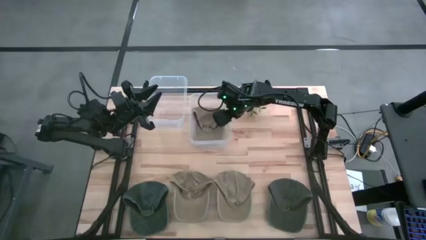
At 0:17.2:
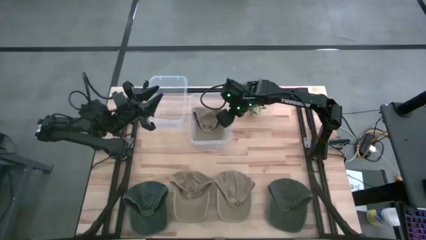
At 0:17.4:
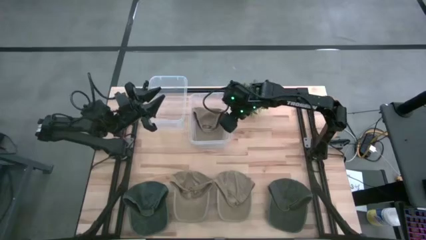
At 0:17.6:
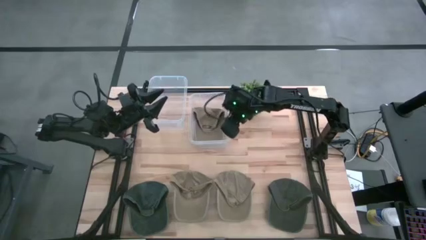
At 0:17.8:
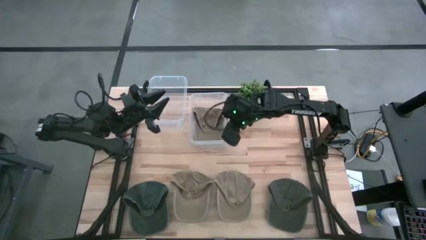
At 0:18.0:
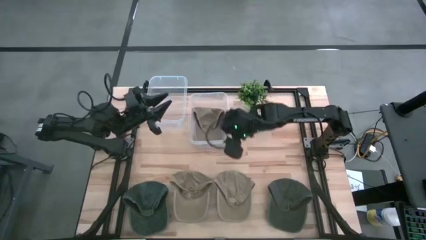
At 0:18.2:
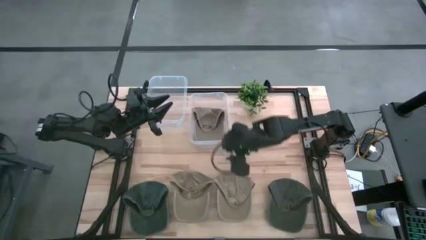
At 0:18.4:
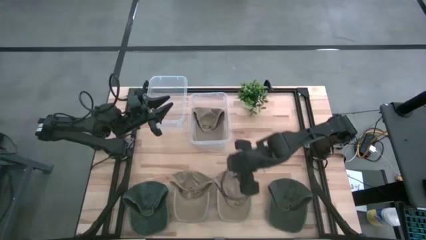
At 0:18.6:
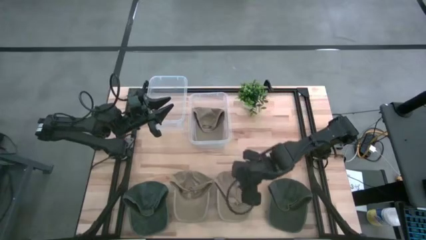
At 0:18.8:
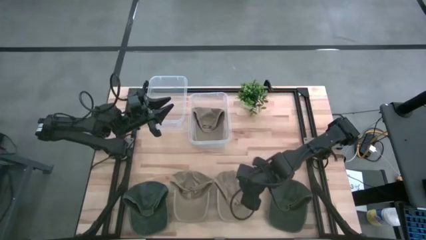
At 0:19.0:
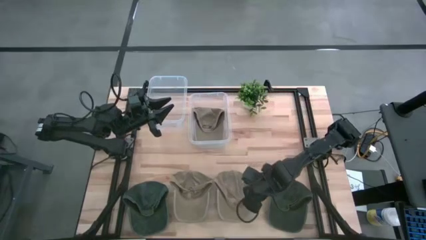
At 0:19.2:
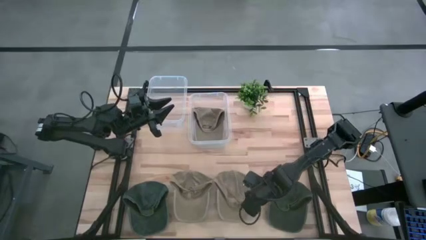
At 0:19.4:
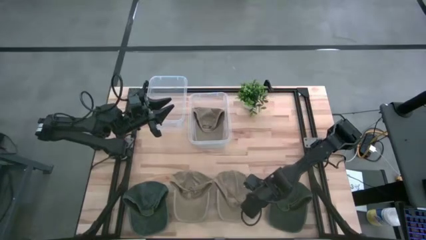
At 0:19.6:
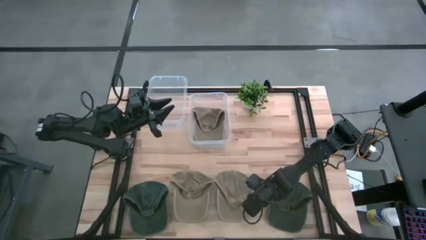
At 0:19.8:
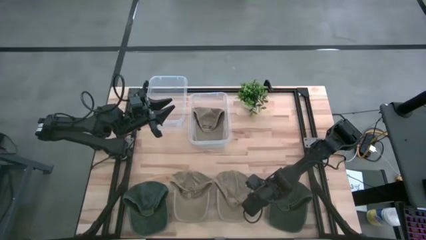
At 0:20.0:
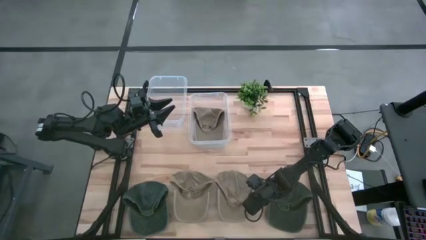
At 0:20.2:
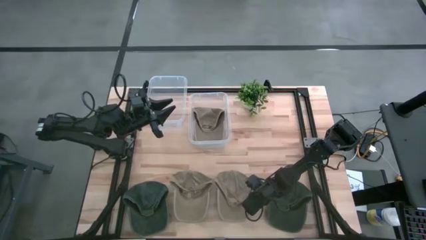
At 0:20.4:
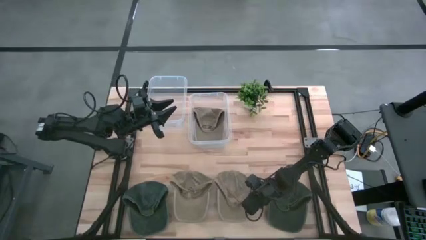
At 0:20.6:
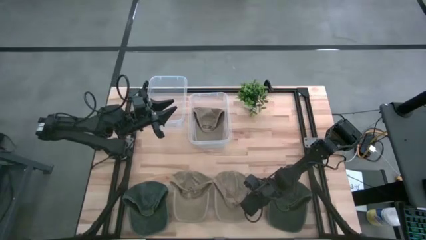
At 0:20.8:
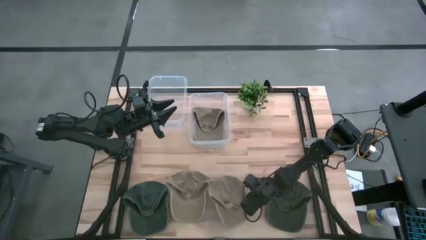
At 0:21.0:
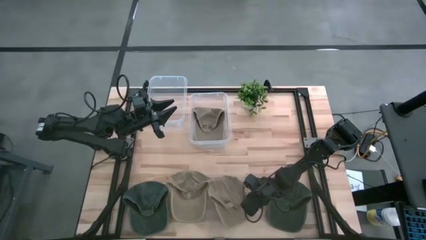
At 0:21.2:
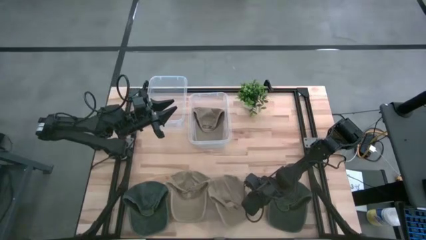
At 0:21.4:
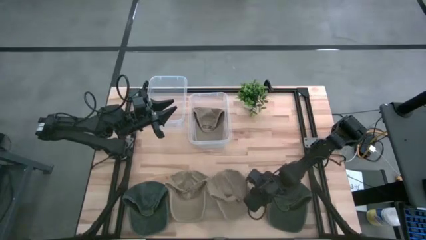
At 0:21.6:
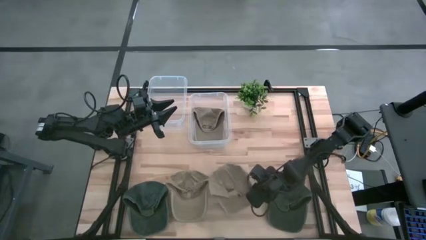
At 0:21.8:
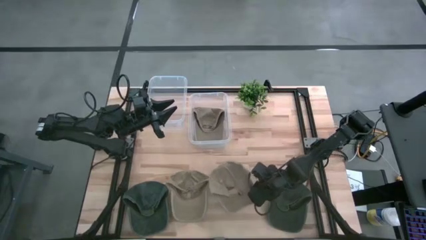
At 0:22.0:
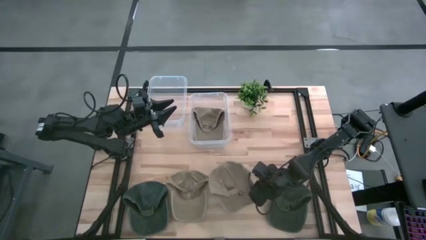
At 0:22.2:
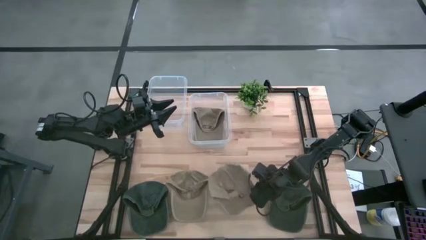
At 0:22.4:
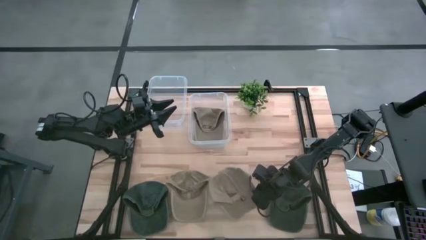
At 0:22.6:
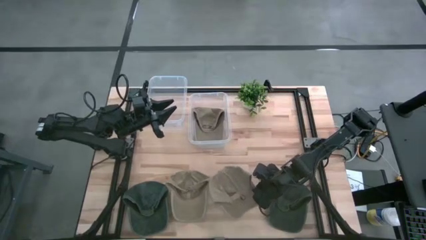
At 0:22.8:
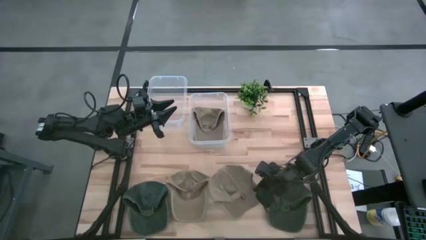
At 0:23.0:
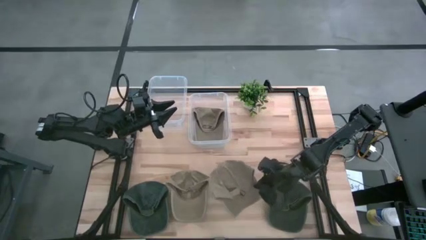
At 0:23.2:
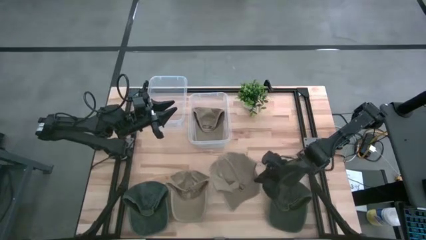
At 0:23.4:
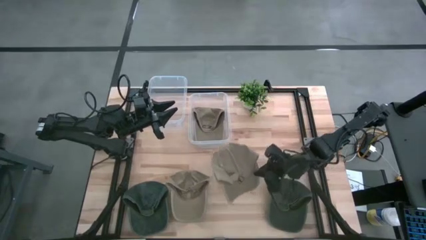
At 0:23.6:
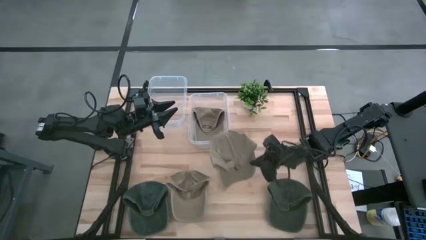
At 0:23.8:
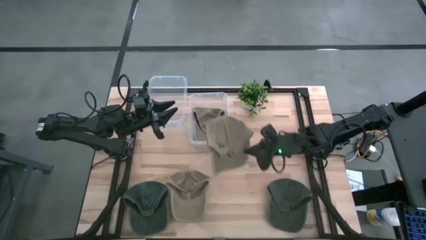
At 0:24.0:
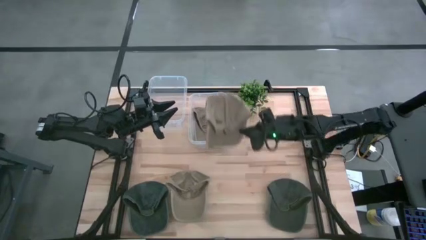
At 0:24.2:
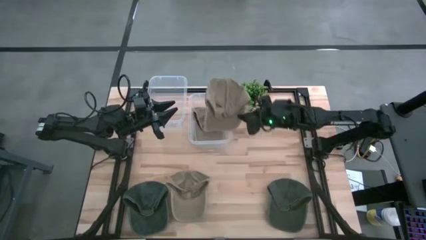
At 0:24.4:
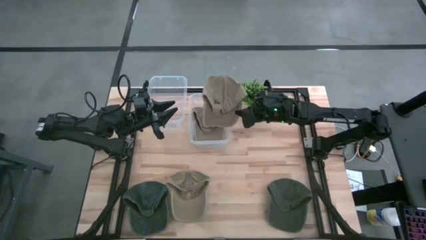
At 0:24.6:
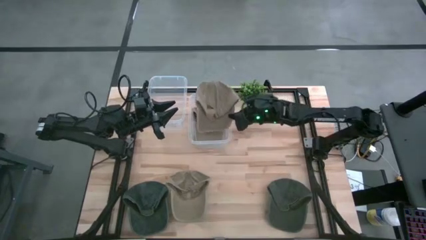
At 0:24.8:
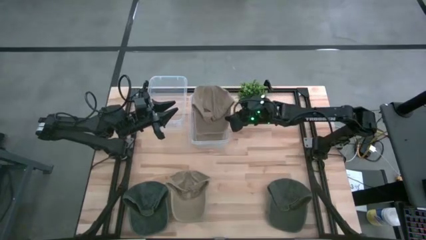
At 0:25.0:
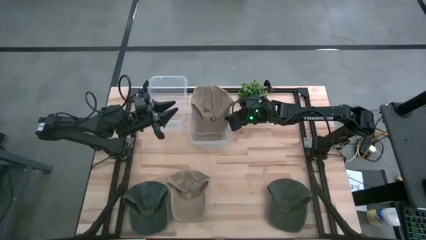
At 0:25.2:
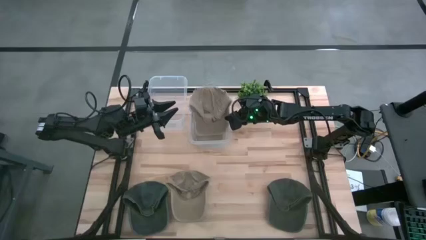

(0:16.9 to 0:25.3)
Task: Pick & Place hat
Put the right brown cap into the right transparent bin
